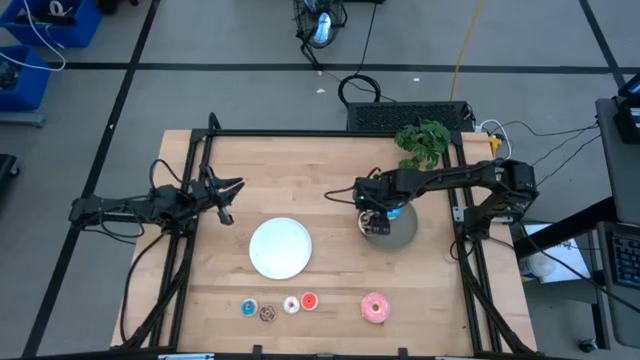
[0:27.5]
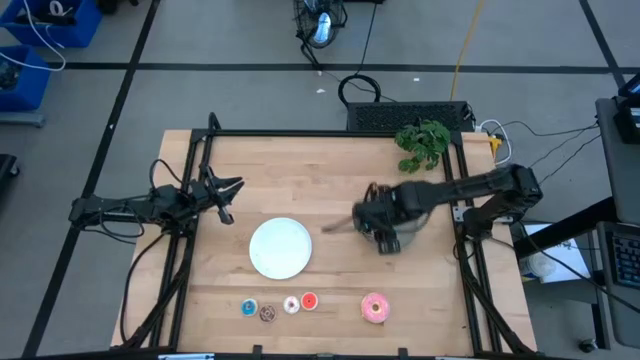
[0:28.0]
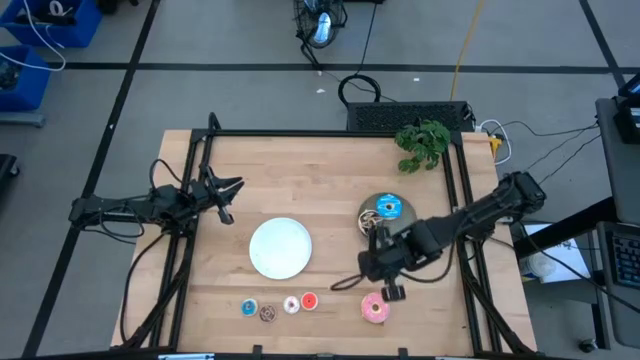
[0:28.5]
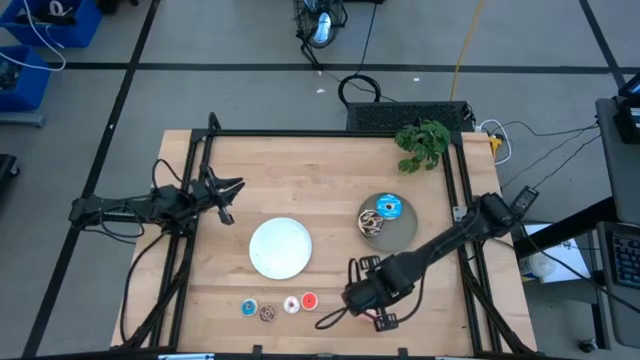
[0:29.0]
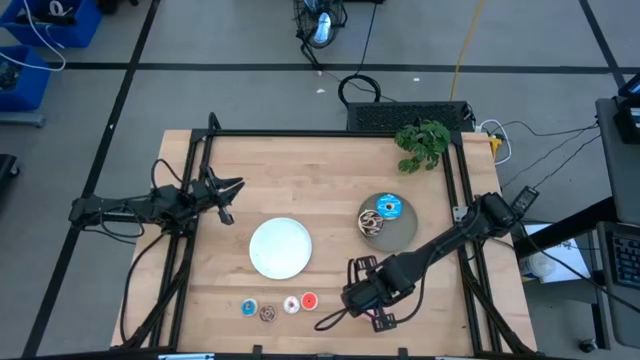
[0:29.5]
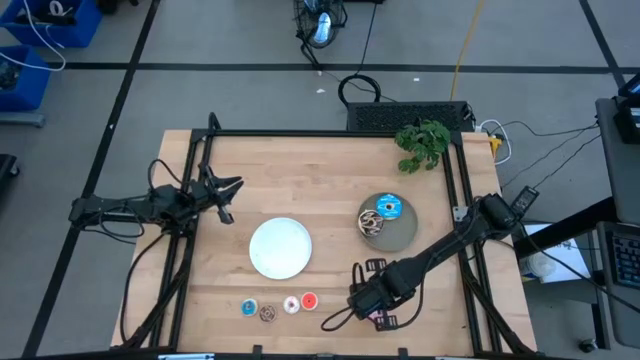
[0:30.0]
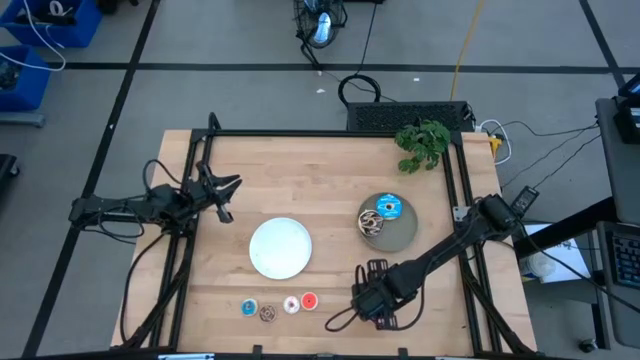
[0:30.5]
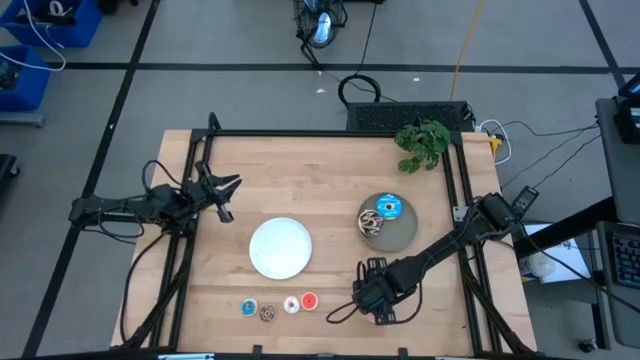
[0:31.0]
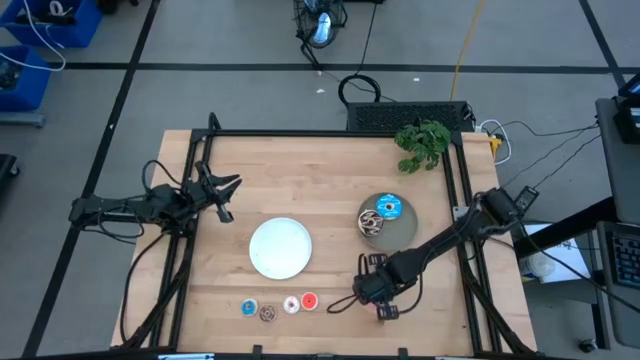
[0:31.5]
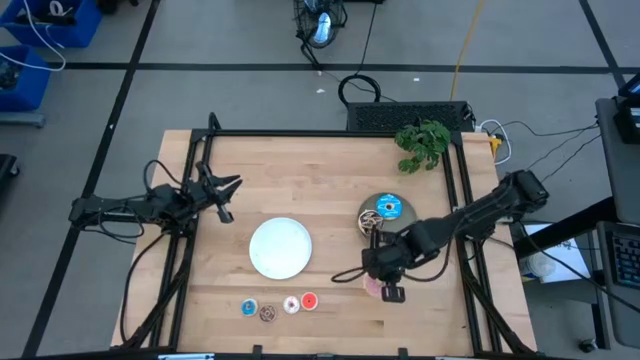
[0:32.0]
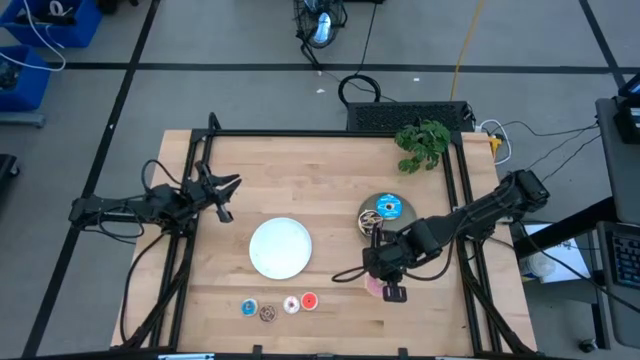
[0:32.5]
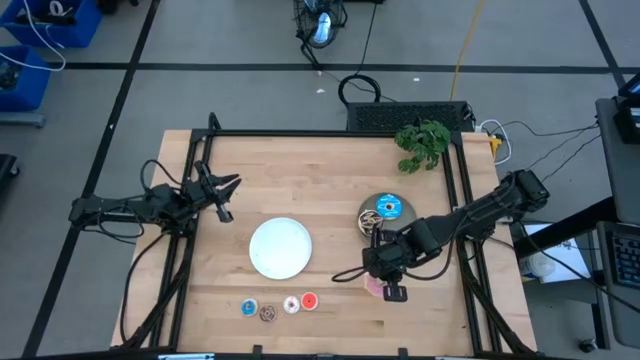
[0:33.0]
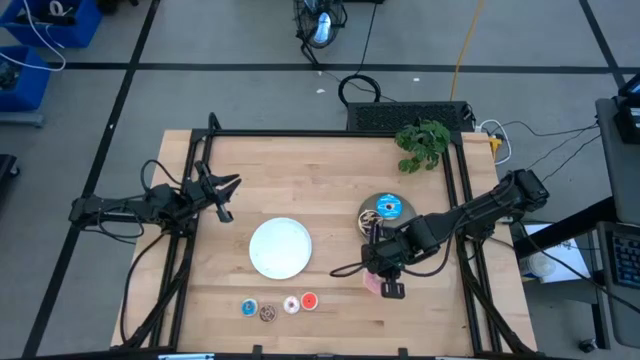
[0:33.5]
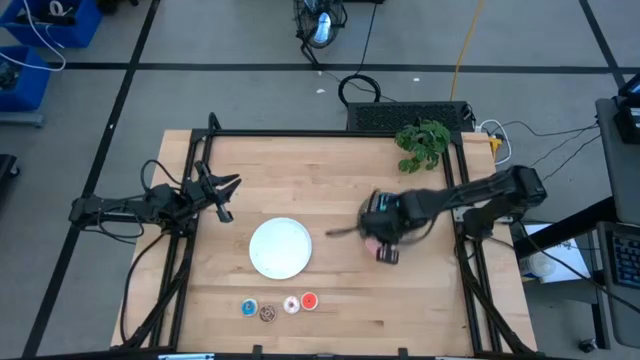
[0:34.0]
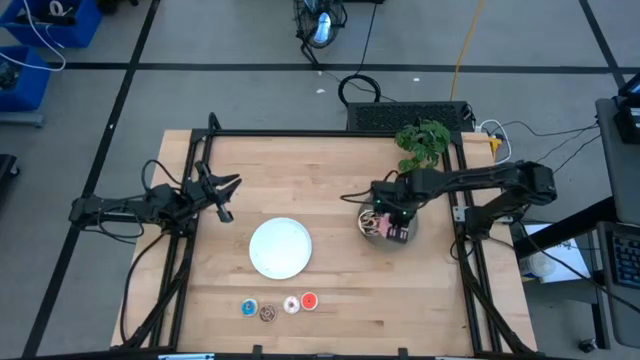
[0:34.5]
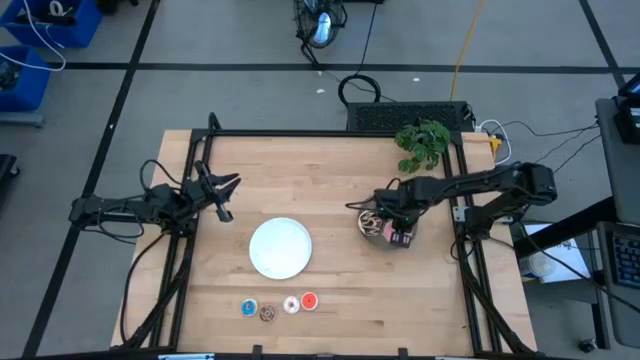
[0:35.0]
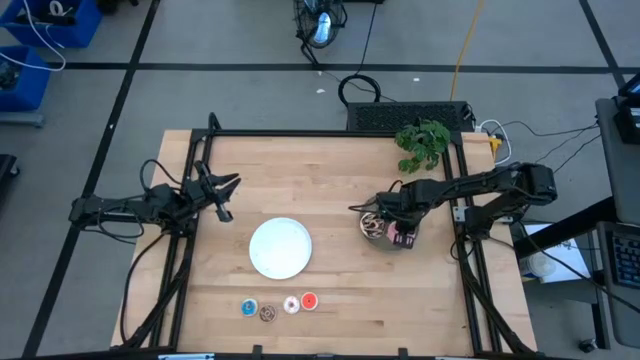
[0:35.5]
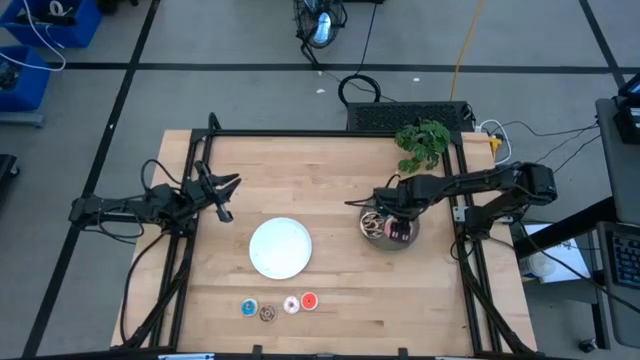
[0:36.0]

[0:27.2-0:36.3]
Task: Pick & Place donuts
Put the large pink donut on the gray plate

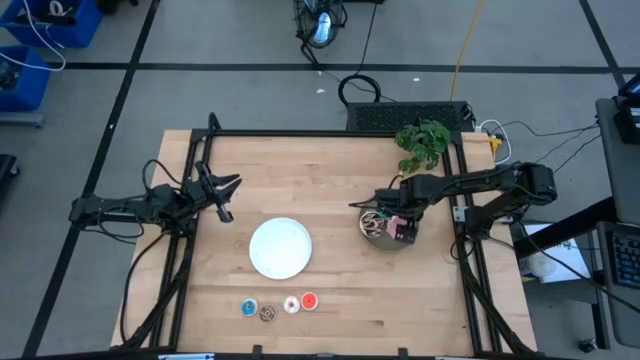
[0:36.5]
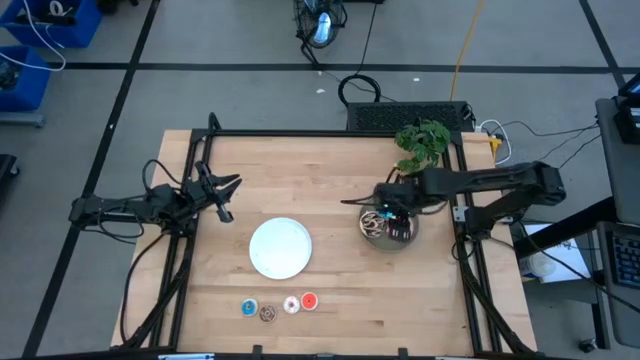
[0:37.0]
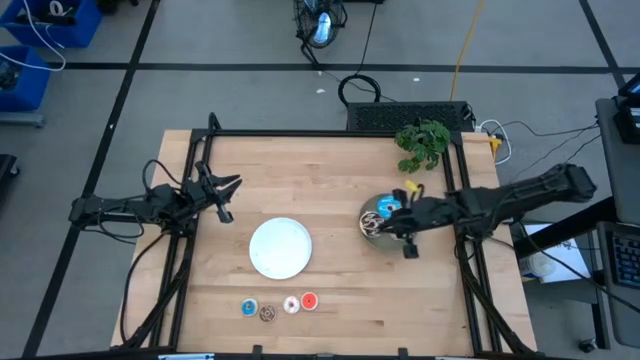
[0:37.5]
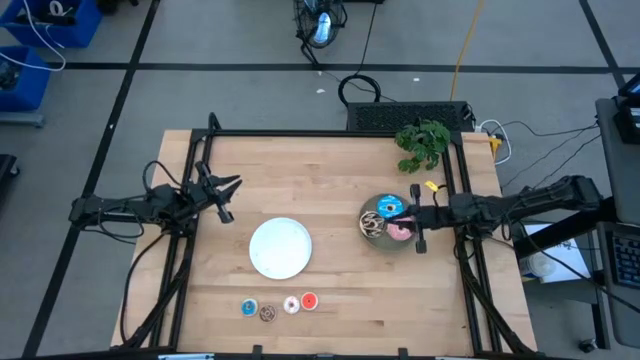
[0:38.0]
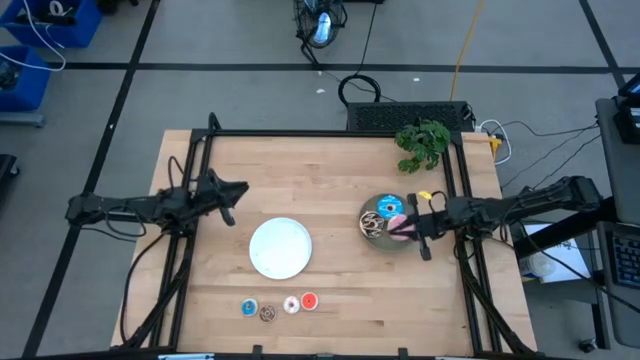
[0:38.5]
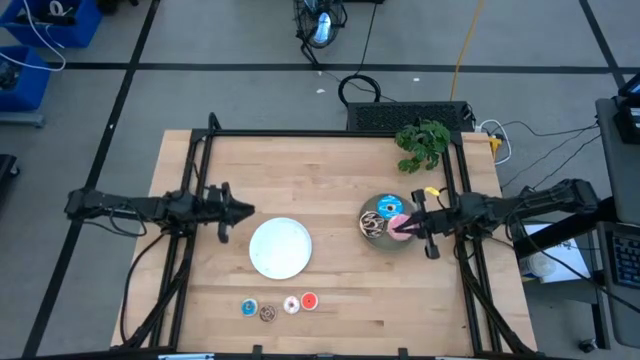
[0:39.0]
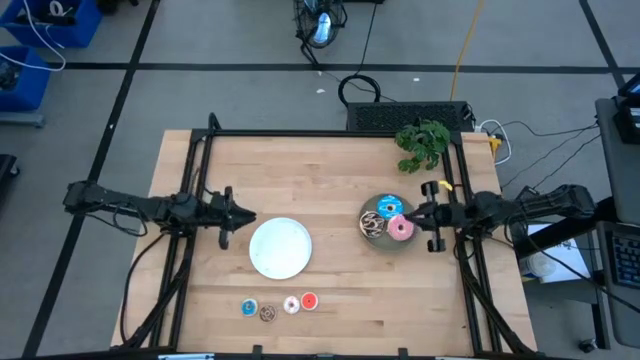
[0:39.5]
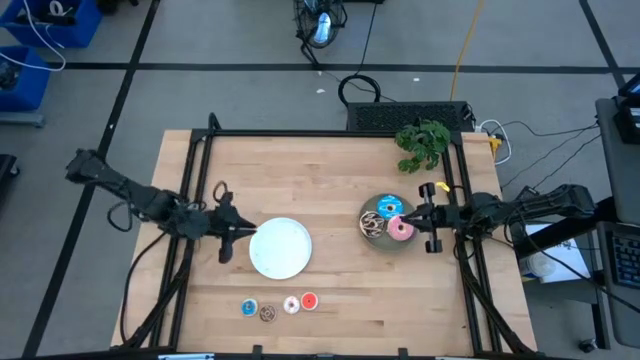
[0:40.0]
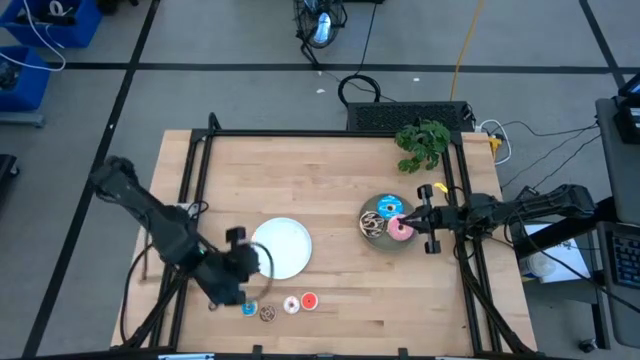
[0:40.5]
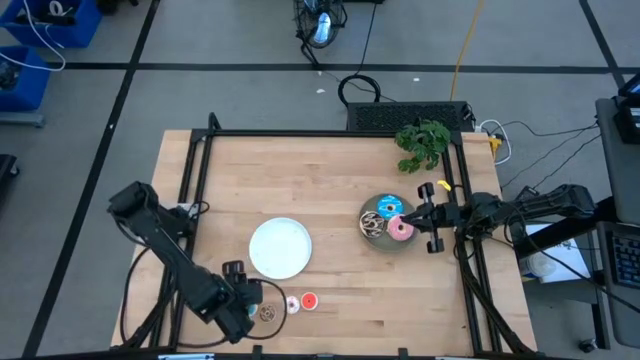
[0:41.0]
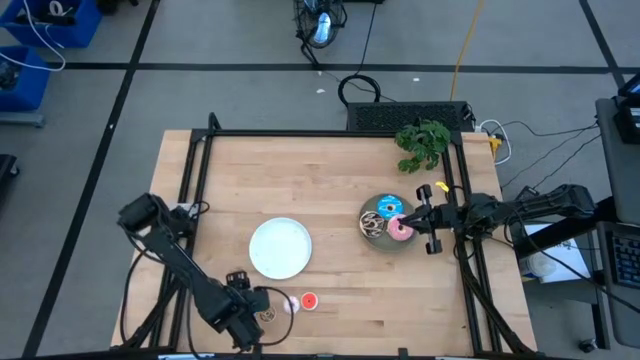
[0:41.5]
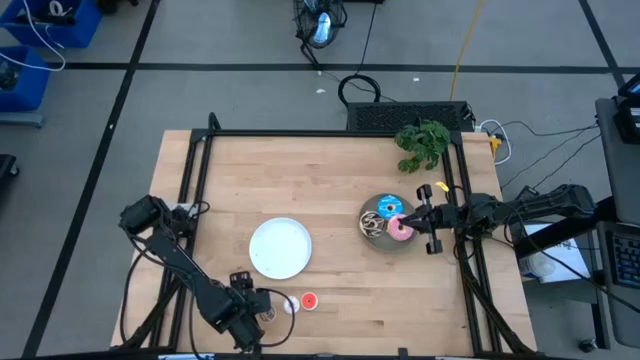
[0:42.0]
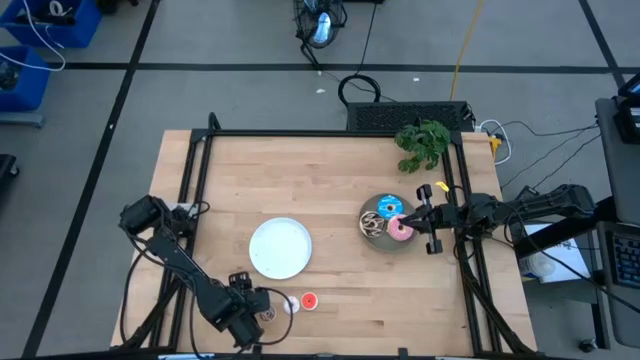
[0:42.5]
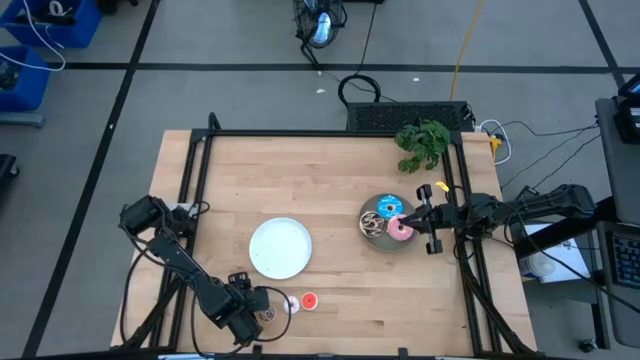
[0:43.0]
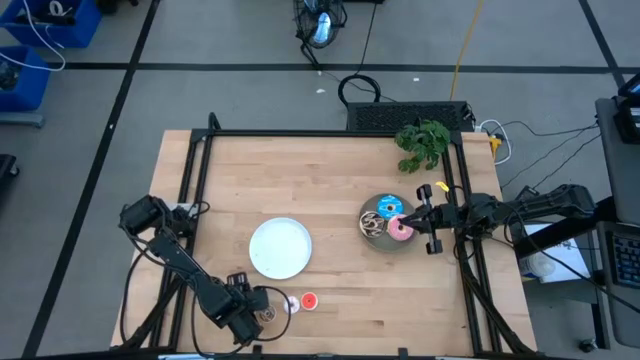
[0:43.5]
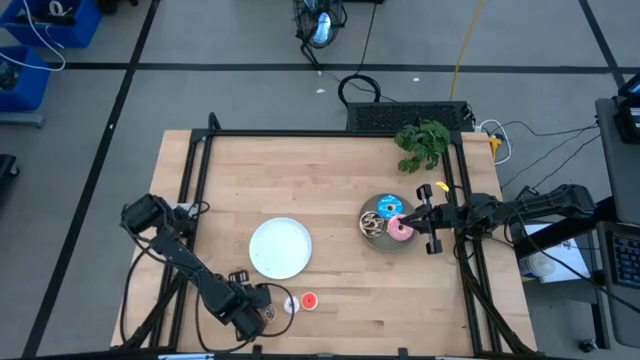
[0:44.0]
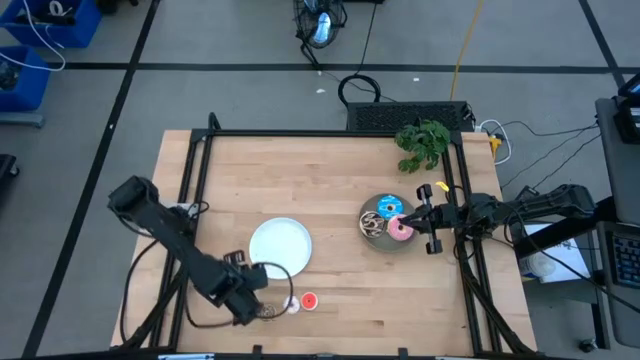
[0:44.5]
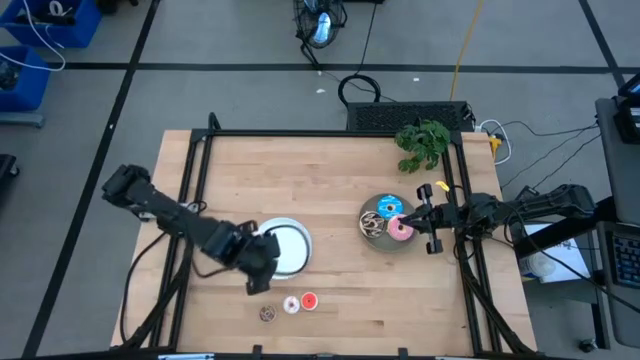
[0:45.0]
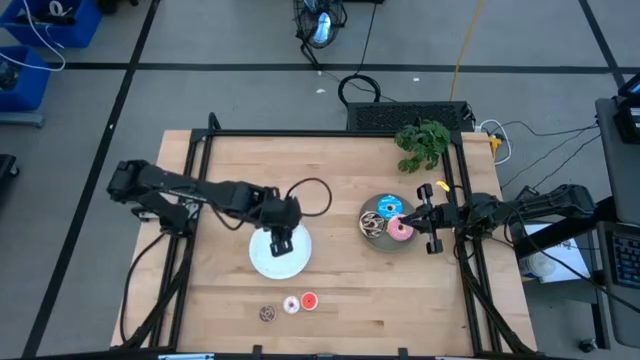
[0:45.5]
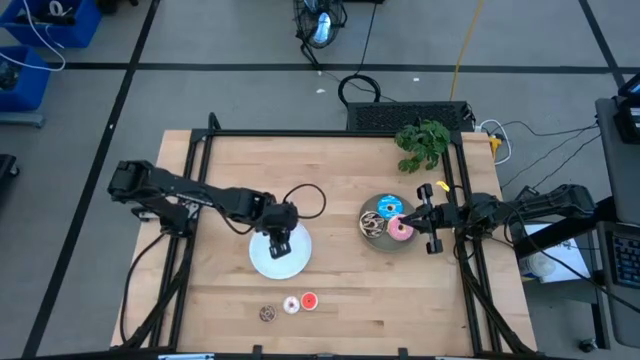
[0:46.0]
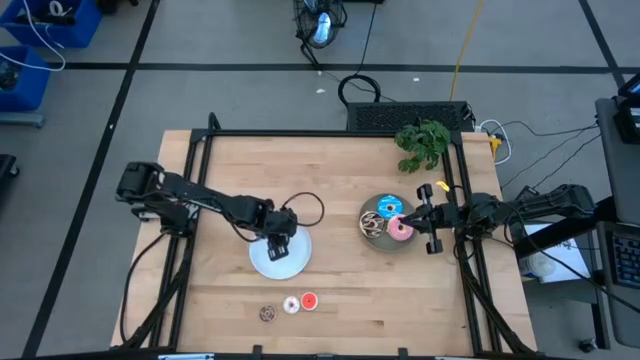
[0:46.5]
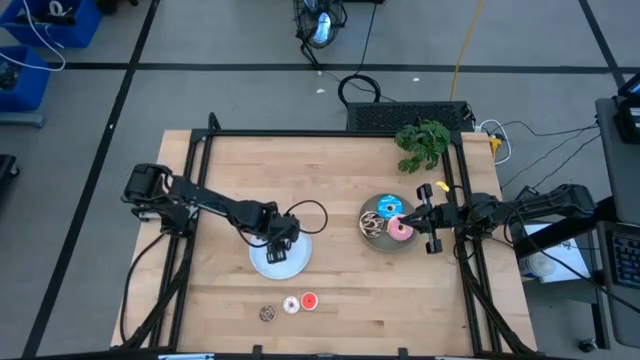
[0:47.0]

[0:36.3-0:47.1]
Put the small blue donut on the white plate

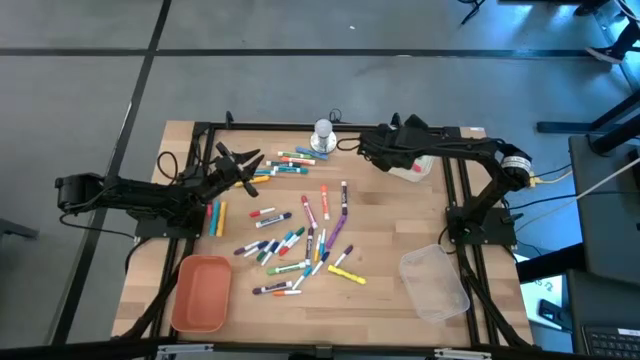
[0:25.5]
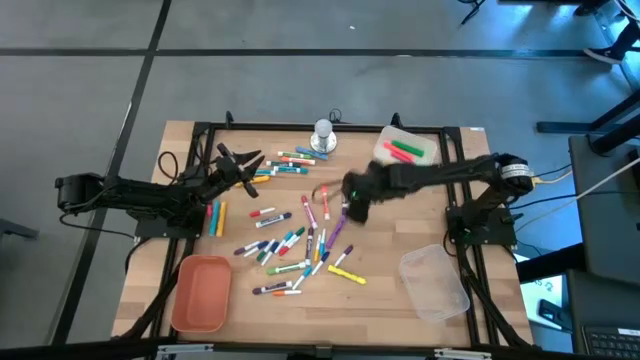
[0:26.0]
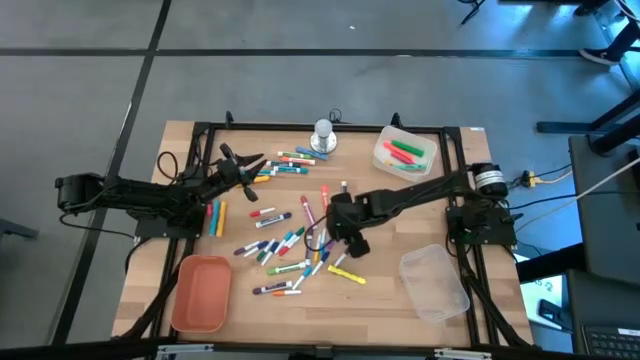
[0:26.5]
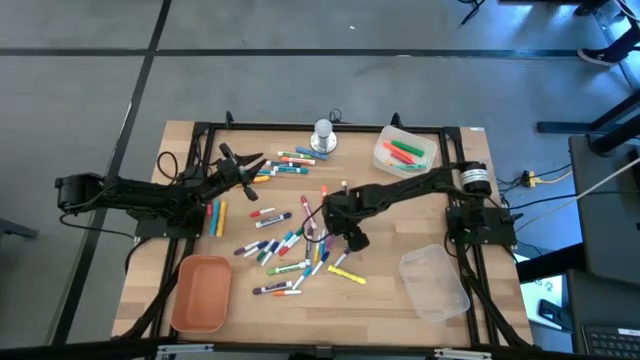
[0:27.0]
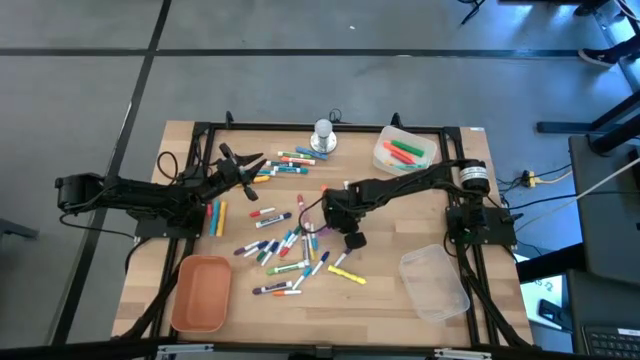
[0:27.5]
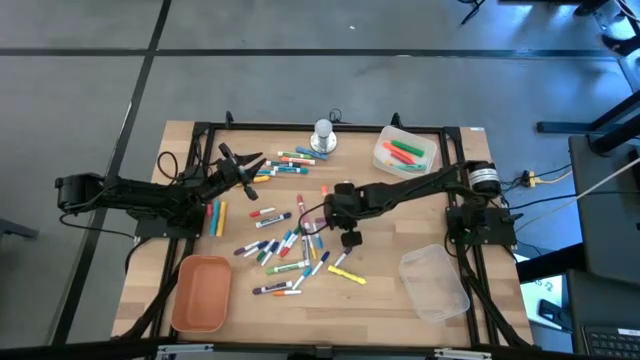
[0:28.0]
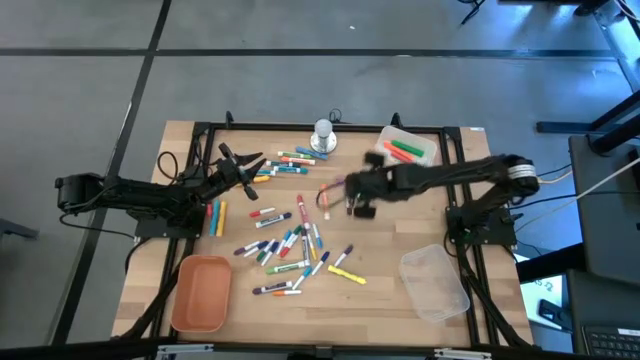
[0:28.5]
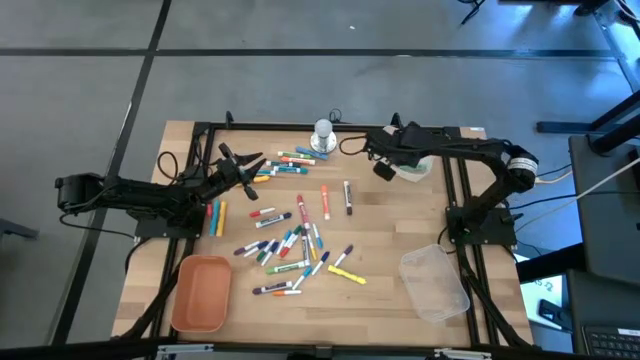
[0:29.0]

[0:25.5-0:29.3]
Task: Pick & Place Markers
Put the large violet highlighter pen into the white bin
